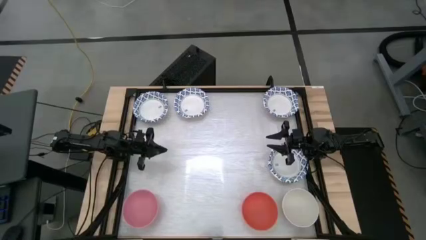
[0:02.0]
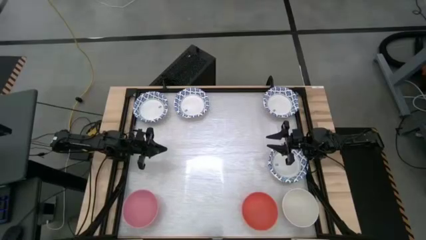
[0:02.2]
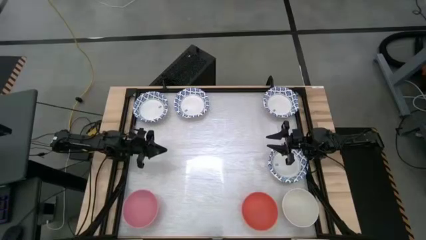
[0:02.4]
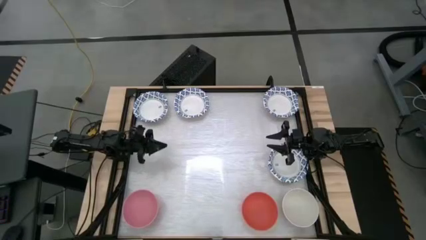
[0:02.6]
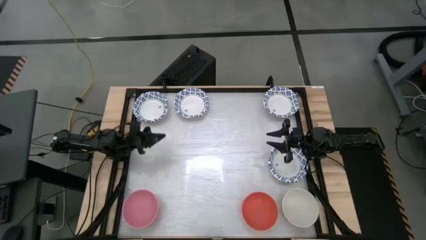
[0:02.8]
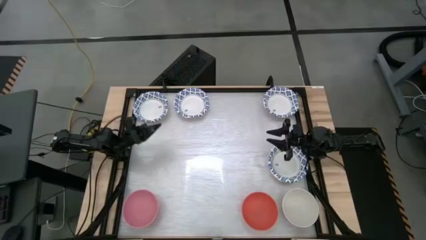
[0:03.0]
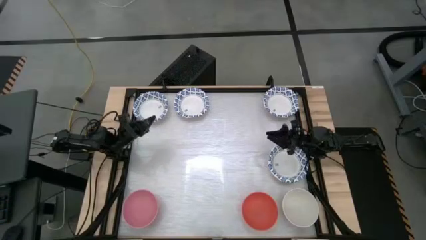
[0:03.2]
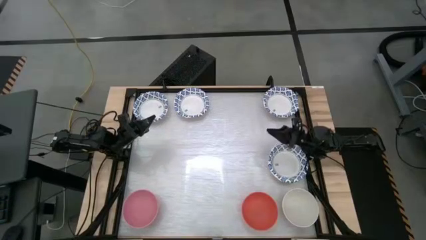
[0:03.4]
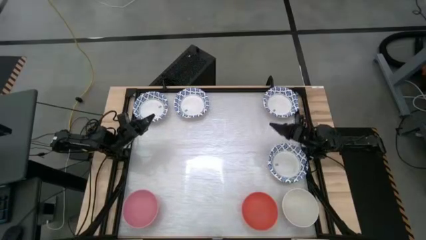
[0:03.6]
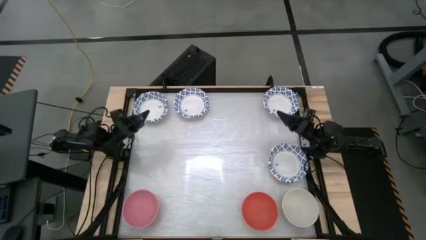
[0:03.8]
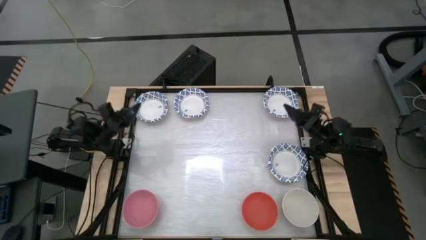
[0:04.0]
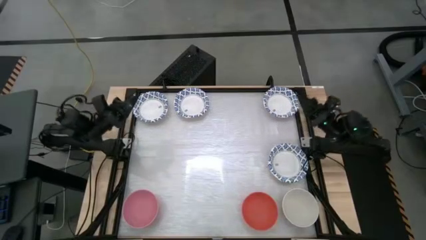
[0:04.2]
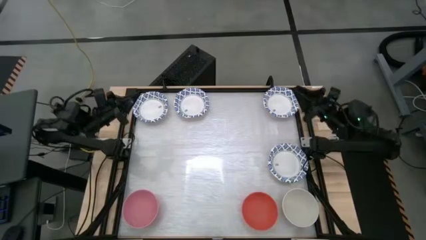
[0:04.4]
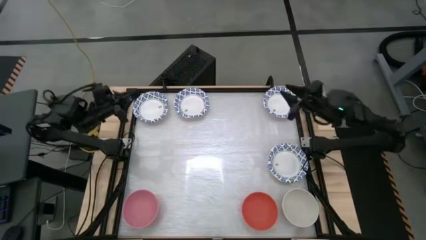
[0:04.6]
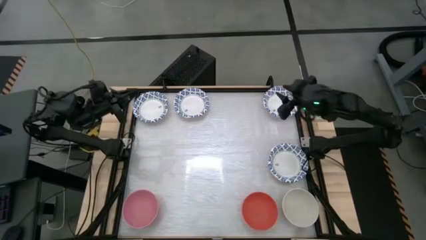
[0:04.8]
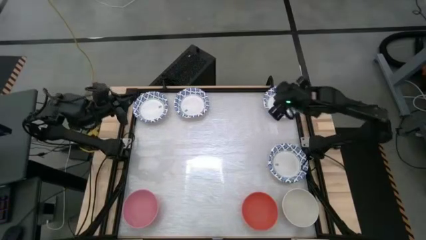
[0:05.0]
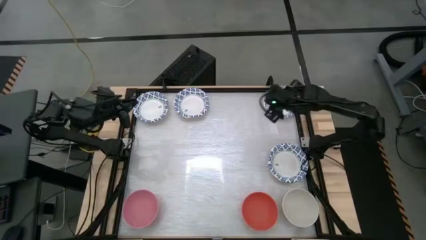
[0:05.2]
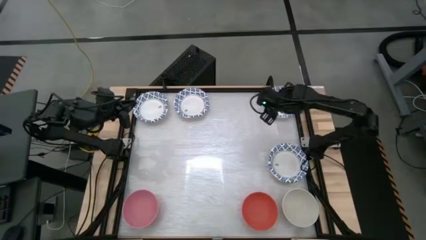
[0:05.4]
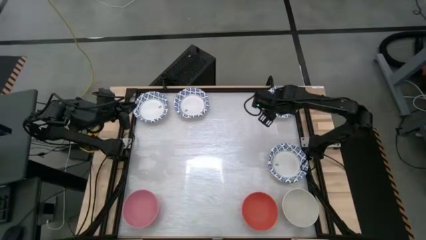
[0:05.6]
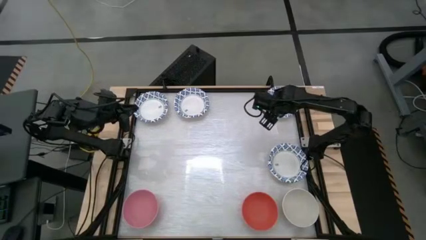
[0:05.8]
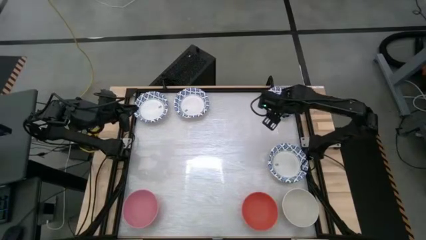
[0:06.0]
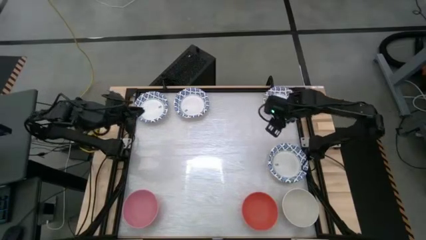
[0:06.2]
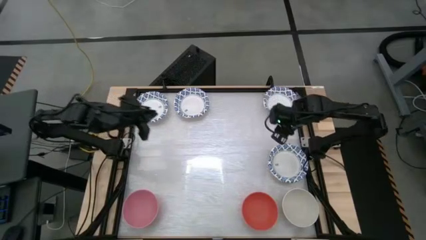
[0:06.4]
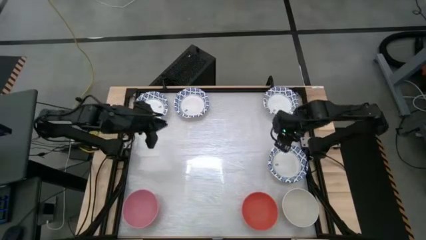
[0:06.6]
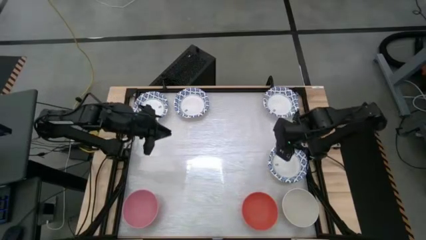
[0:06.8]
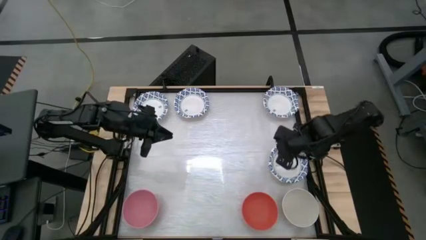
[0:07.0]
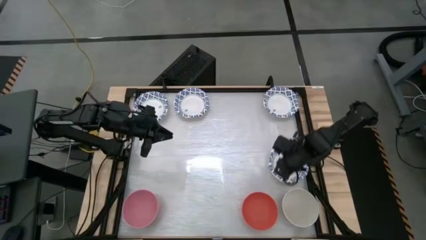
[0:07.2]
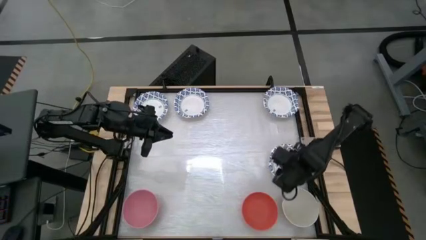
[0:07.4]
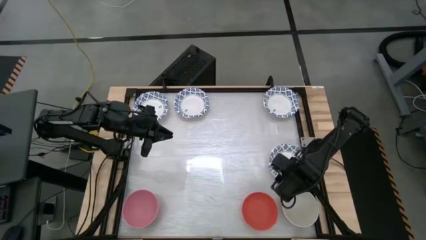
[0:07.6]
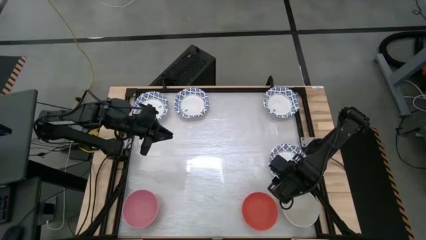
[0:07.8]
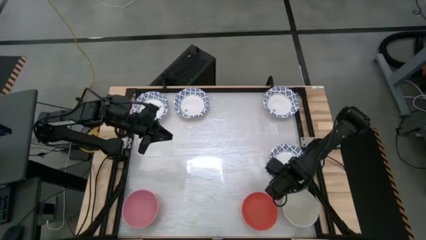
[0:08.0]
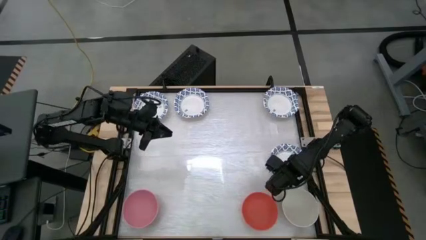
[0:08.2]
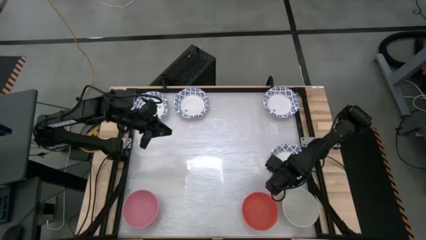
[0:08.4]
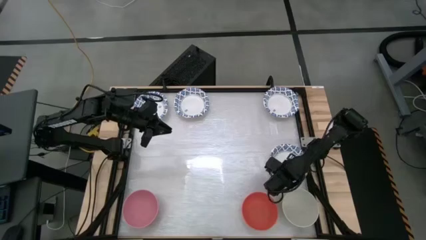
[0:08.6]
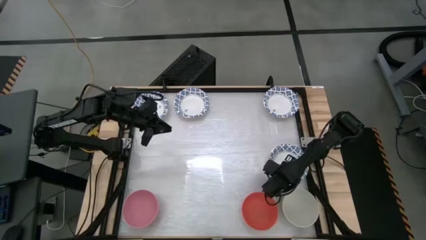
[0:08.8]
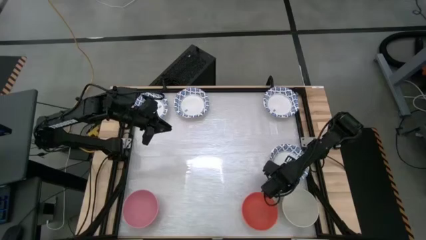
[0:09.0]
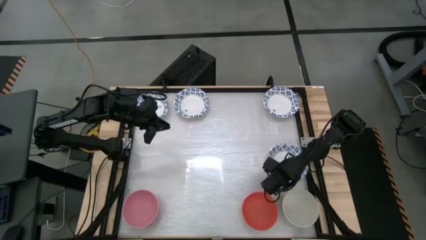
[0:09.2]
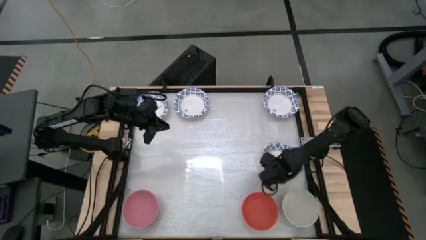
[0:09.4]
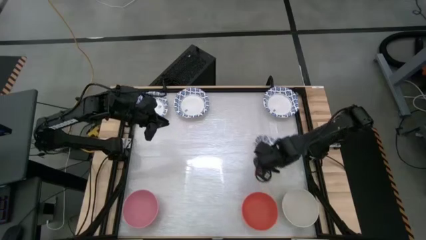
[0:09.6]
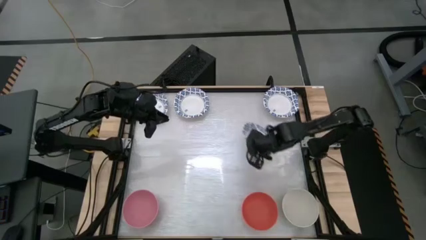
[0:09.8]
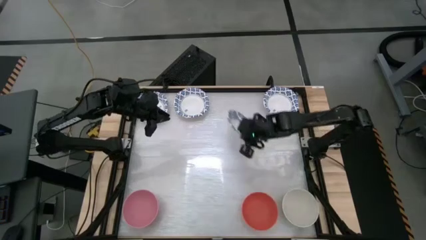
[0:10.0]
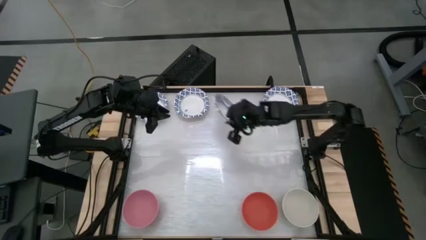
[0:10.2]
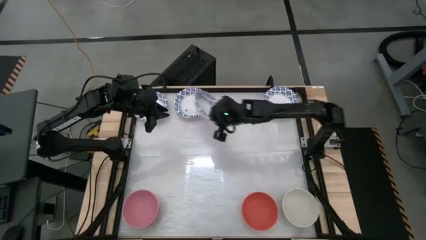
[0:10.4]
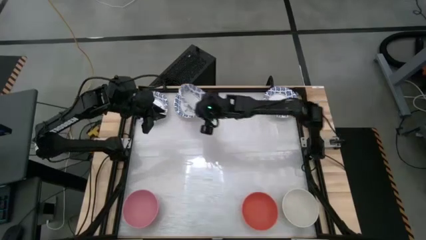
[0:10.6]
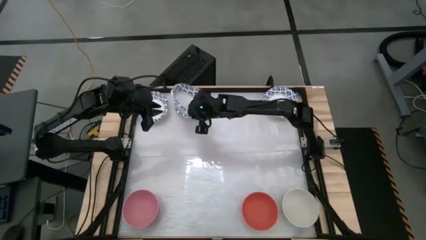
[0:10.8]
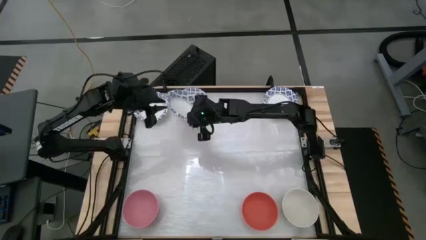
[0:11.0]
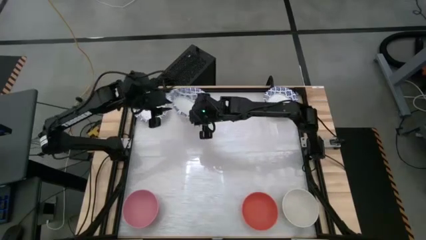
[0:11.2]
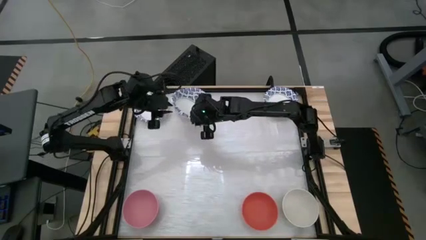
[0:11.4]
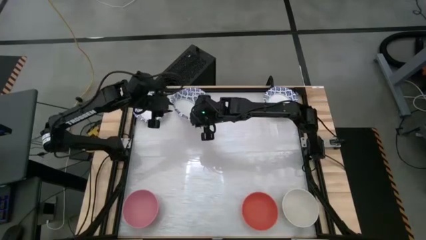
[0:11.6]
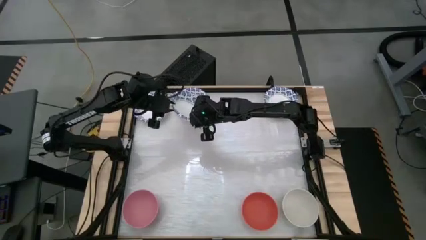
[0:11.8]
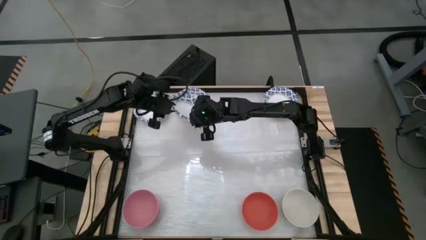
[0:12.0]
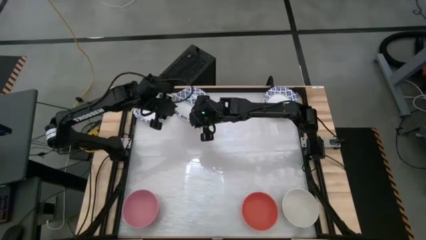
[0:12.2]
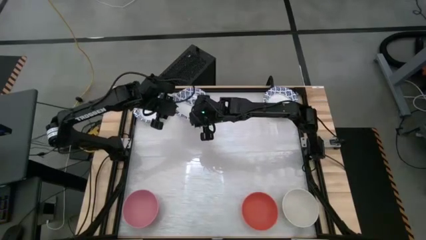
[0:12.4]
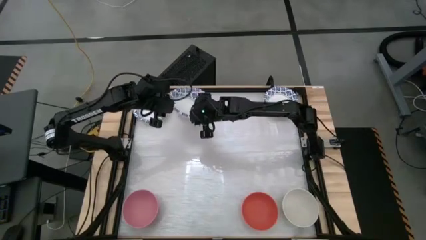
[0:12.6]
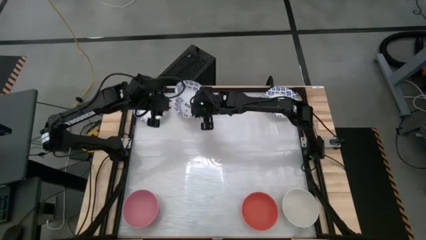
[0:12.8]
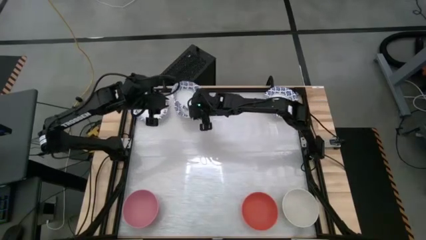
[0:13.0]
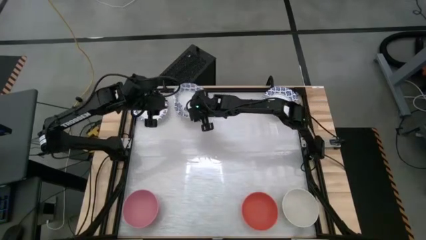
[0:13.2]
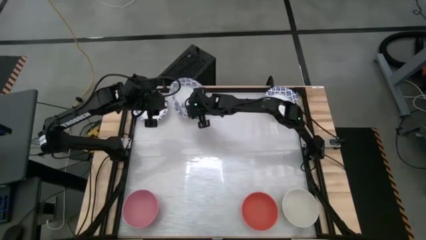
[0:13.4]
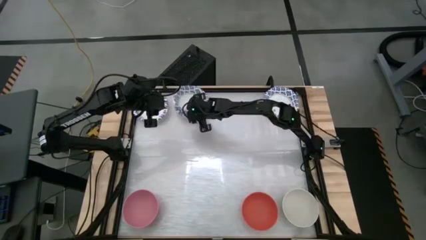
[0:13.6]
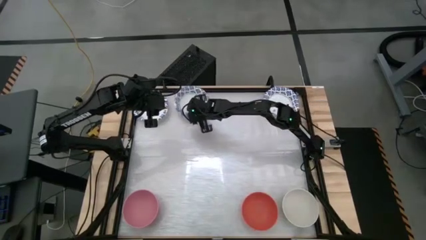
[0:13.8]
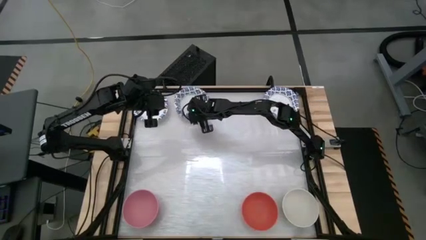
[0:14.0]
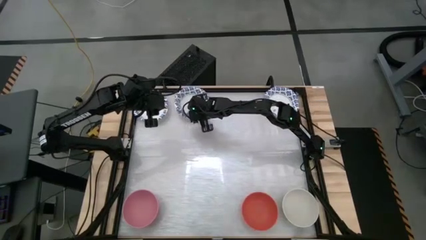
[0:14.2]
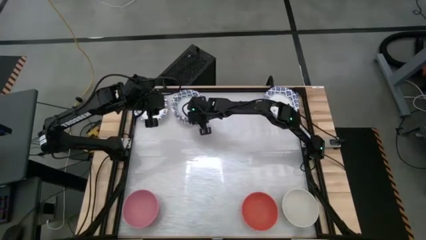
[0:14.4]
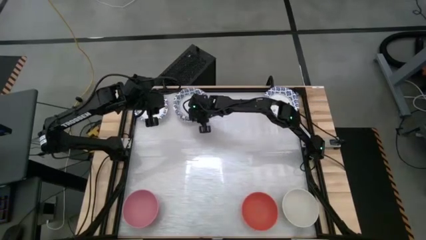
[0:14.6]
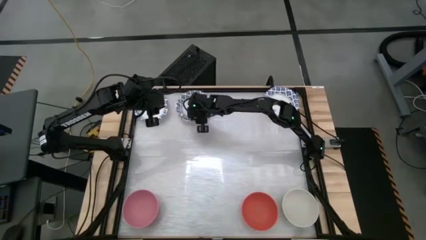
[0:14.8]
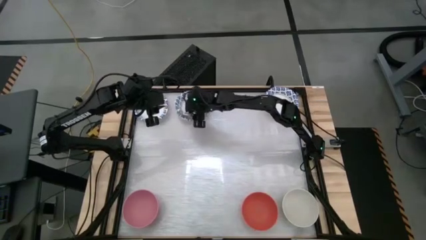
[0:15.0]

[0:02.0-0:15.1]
Stack the blue patterned bowl on top of the blue patterned bowl

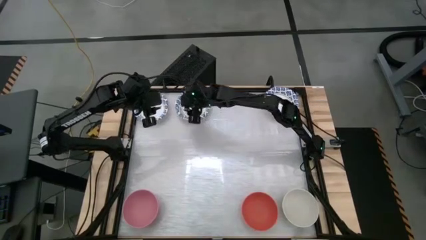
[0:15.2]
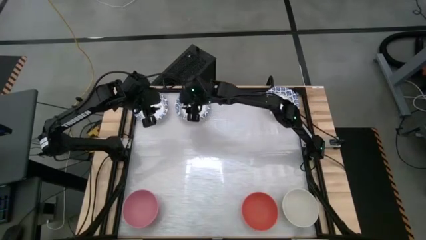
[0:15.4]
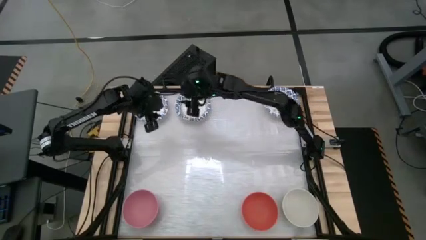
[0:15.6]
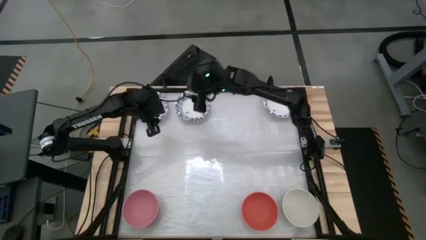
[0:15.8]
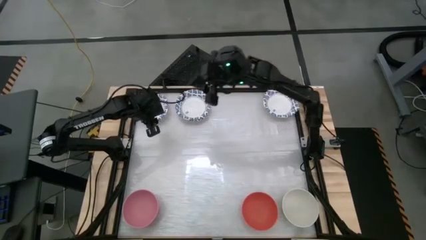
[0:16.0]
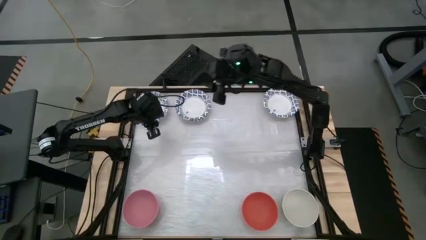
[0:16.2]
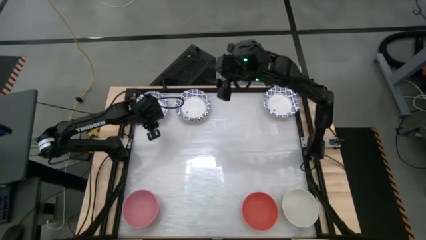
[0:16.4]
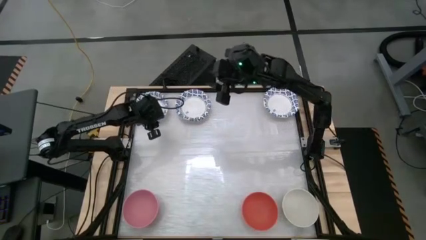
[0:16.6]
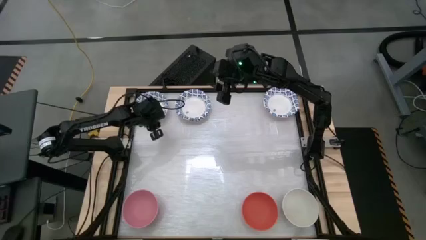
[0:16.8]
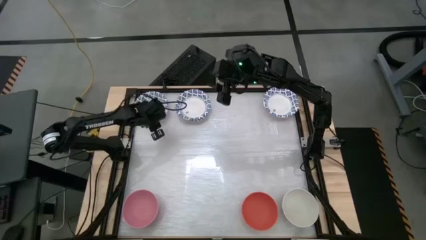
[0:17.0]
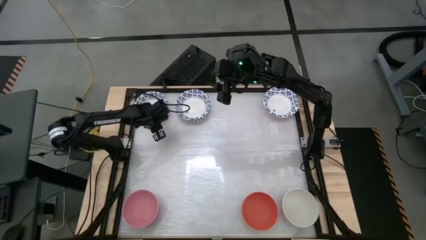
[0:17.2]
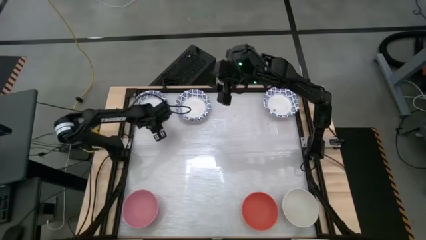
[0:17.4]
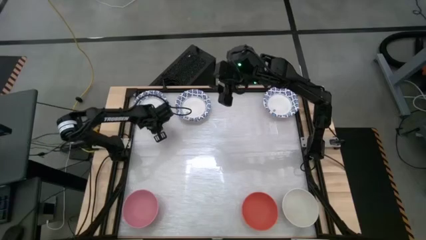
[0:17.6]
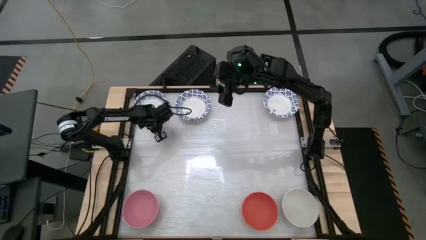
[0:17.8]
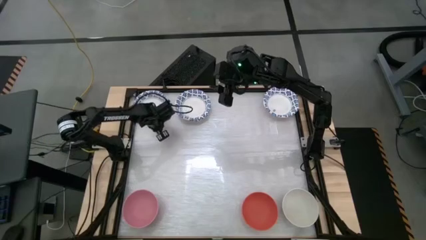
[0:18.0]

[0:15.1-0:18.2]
Stack the blue patterned bowl on top of the blue patterned bowl
